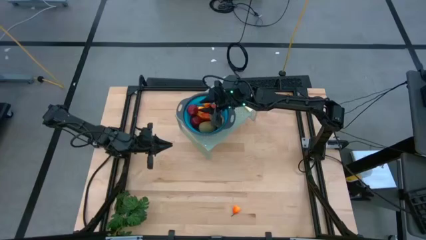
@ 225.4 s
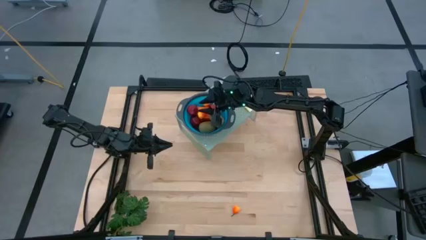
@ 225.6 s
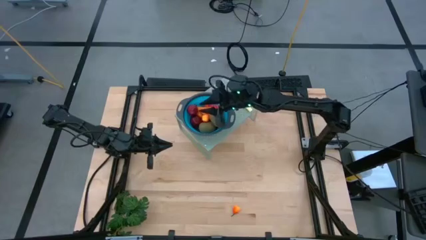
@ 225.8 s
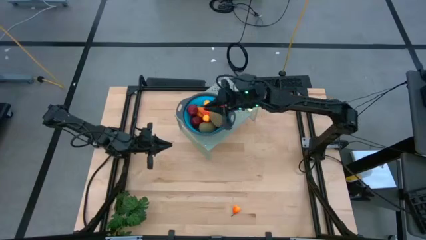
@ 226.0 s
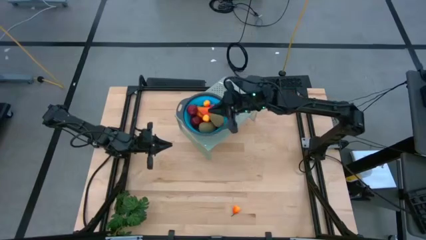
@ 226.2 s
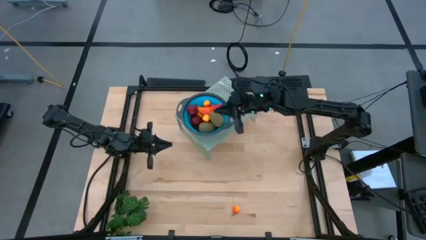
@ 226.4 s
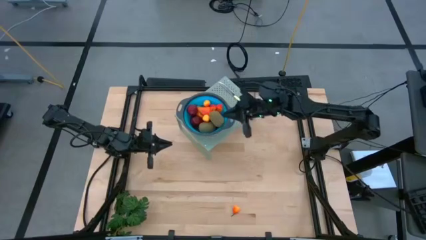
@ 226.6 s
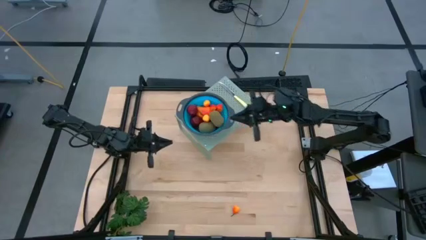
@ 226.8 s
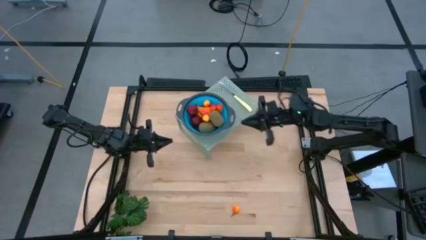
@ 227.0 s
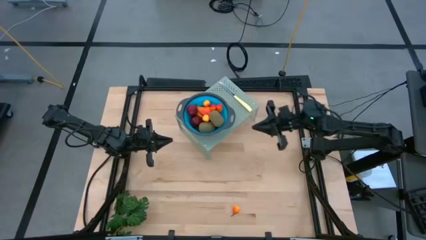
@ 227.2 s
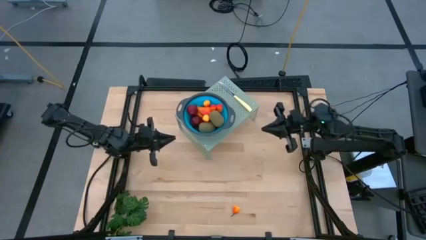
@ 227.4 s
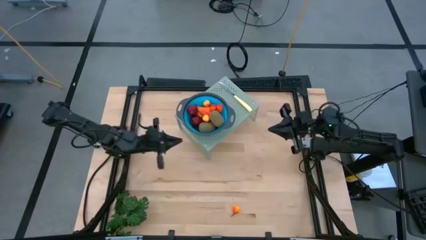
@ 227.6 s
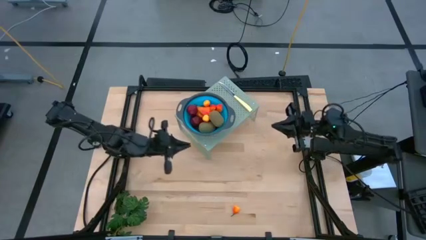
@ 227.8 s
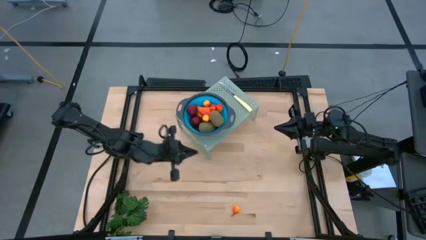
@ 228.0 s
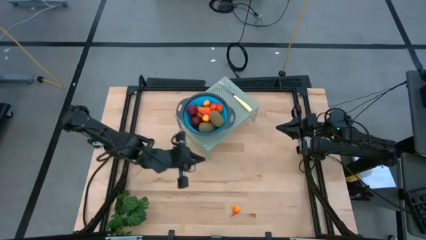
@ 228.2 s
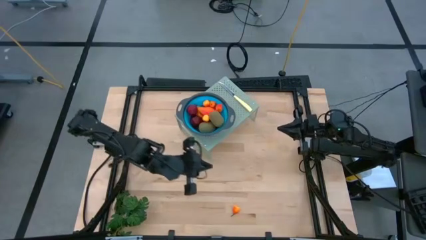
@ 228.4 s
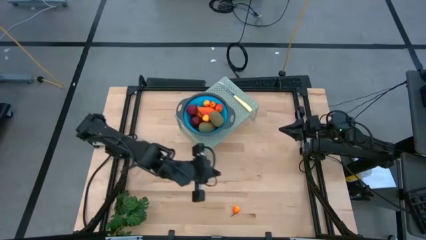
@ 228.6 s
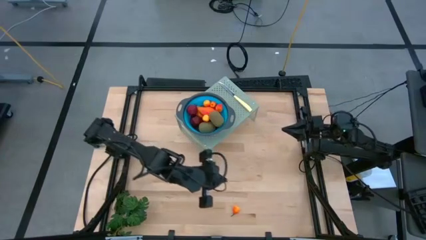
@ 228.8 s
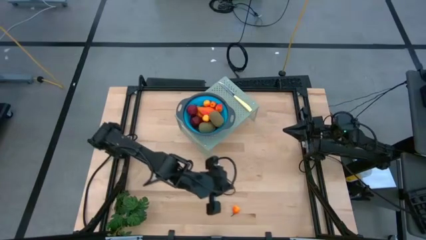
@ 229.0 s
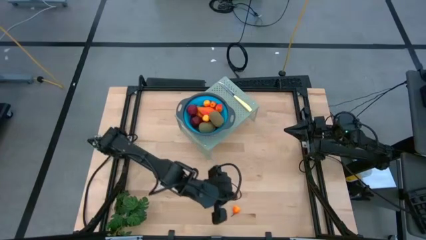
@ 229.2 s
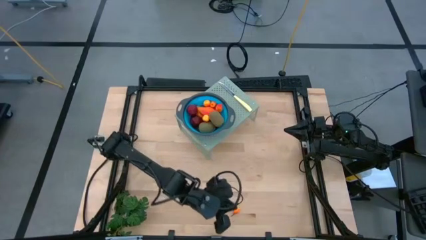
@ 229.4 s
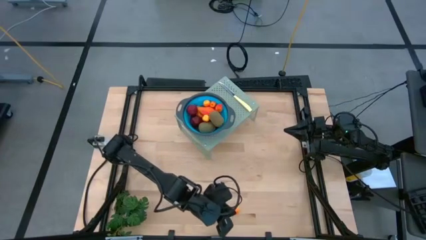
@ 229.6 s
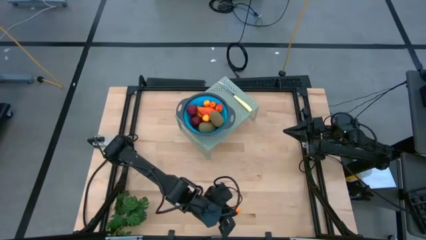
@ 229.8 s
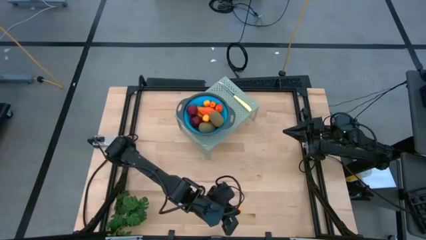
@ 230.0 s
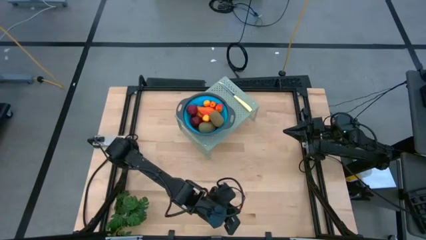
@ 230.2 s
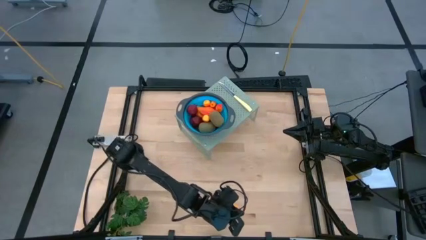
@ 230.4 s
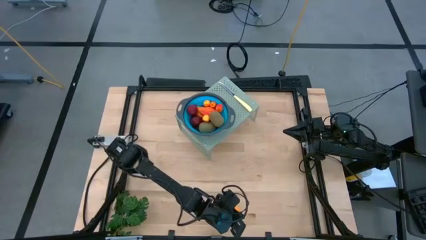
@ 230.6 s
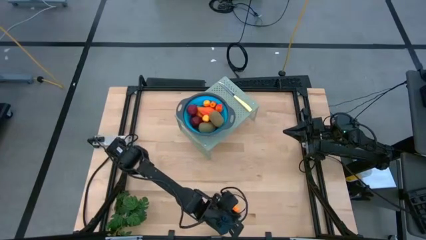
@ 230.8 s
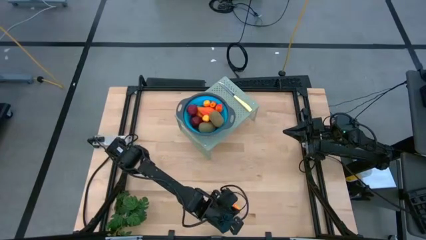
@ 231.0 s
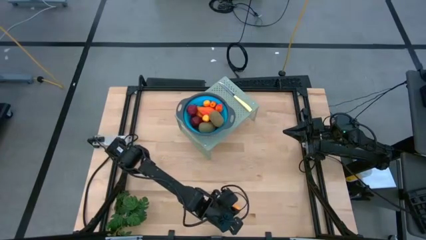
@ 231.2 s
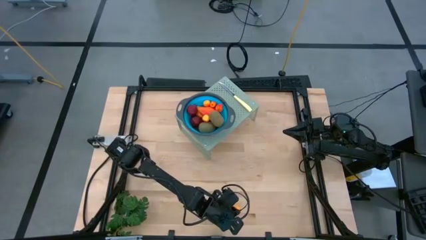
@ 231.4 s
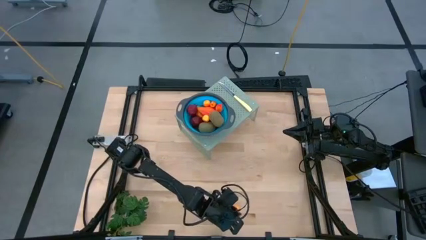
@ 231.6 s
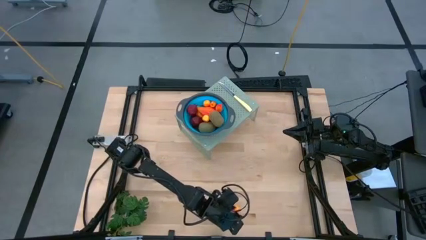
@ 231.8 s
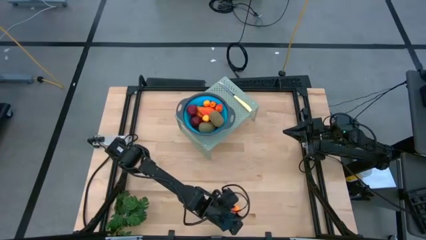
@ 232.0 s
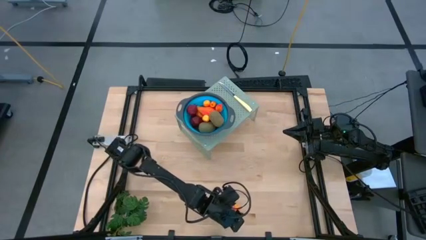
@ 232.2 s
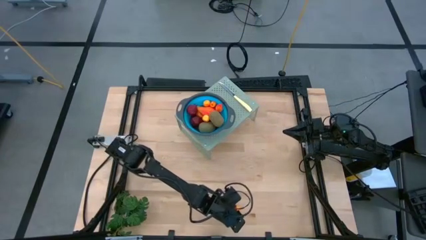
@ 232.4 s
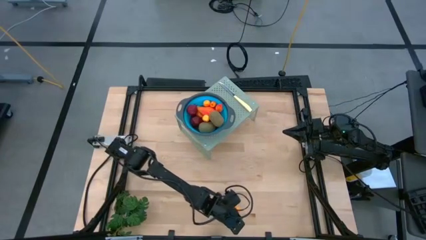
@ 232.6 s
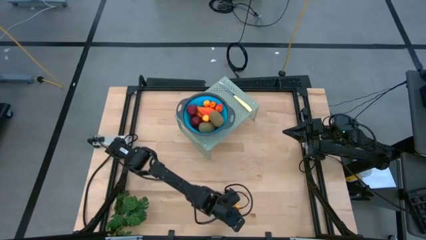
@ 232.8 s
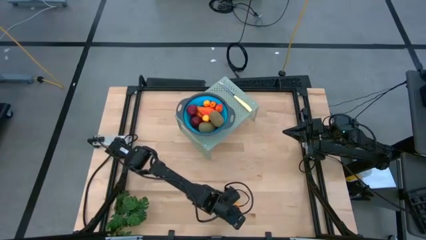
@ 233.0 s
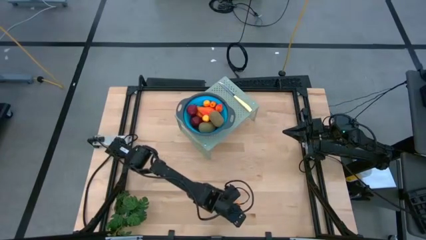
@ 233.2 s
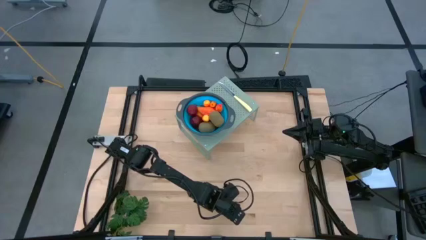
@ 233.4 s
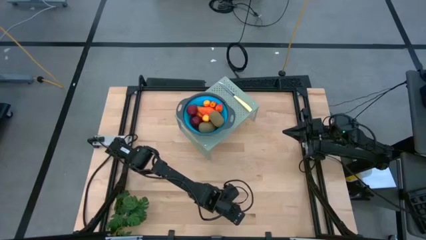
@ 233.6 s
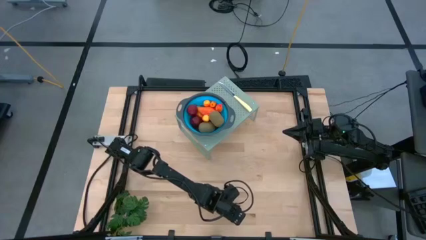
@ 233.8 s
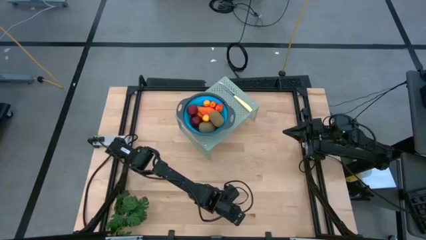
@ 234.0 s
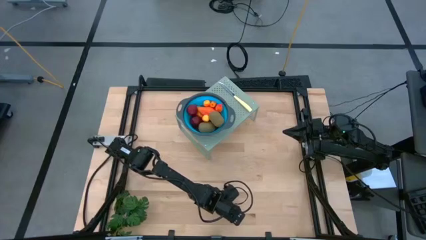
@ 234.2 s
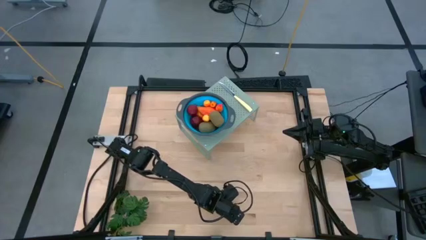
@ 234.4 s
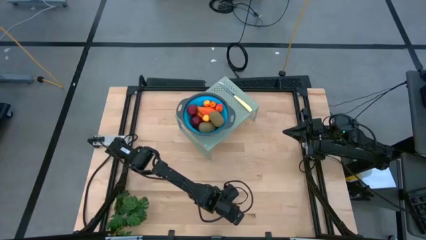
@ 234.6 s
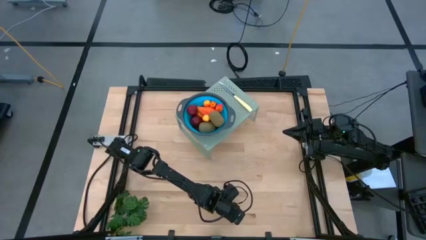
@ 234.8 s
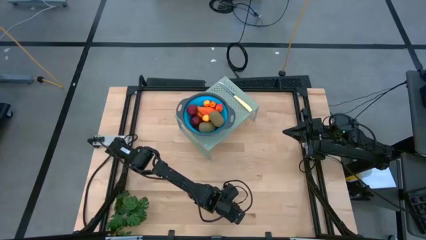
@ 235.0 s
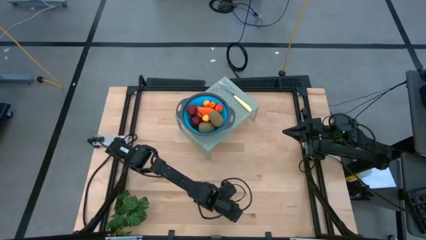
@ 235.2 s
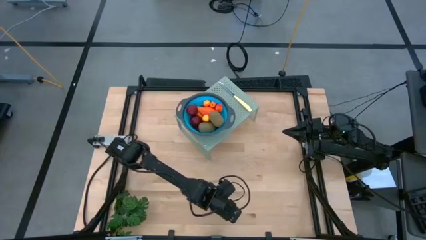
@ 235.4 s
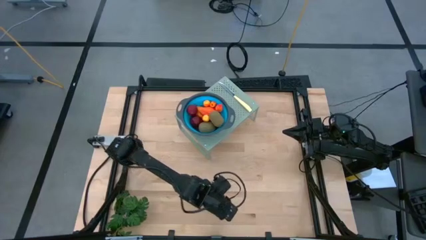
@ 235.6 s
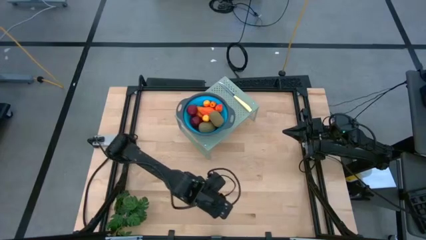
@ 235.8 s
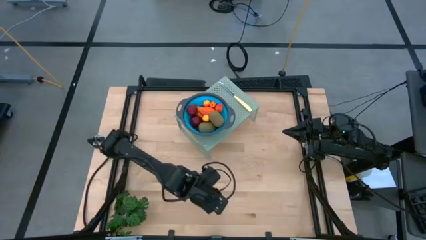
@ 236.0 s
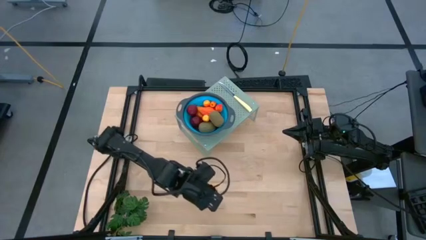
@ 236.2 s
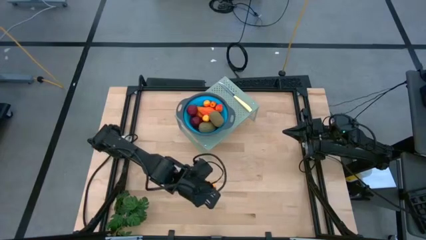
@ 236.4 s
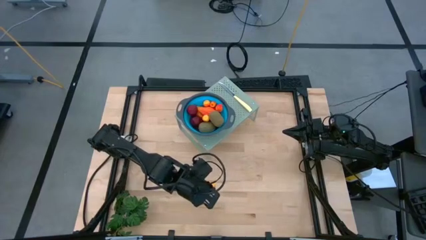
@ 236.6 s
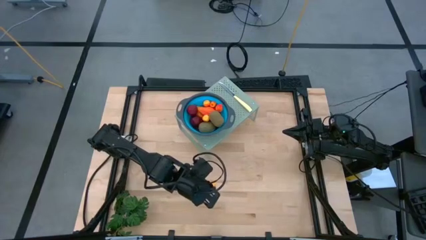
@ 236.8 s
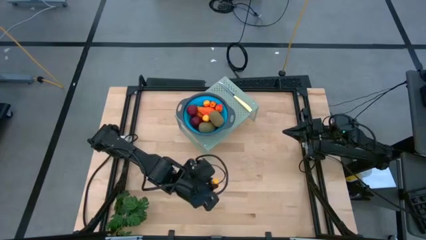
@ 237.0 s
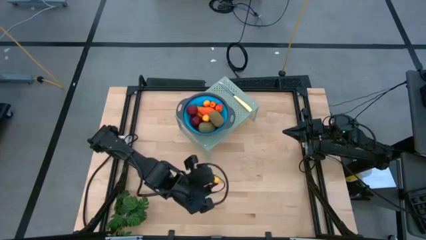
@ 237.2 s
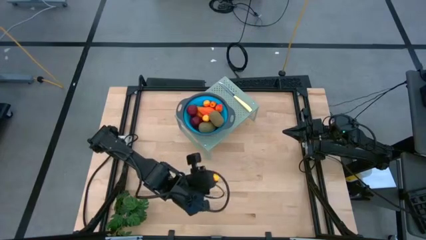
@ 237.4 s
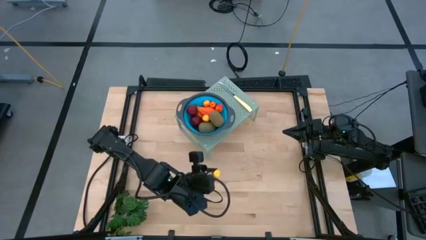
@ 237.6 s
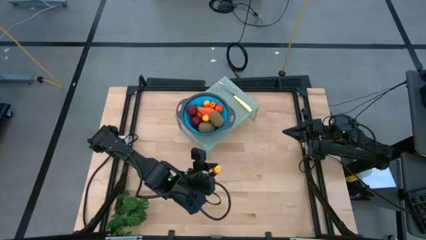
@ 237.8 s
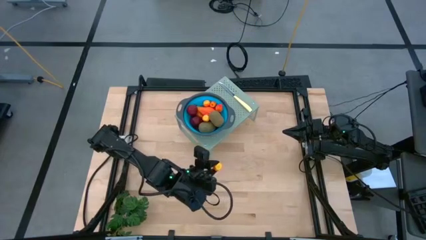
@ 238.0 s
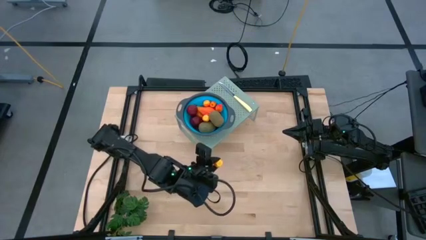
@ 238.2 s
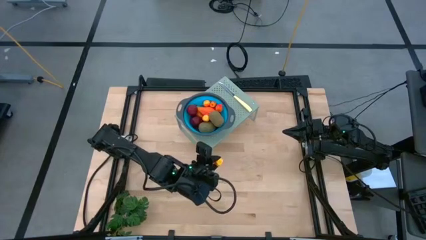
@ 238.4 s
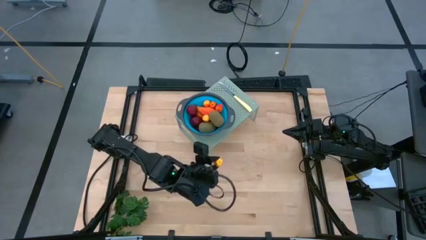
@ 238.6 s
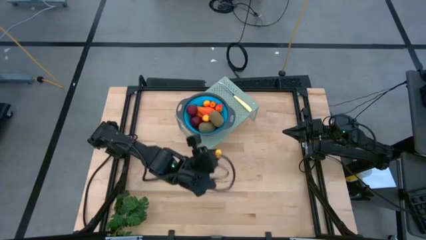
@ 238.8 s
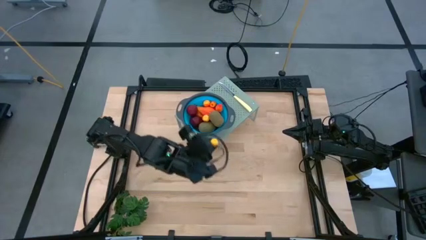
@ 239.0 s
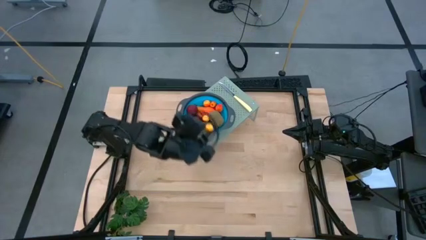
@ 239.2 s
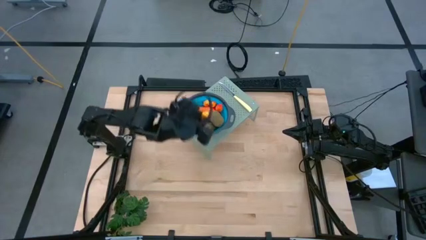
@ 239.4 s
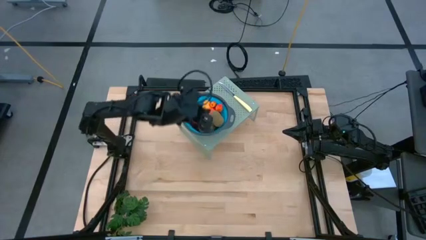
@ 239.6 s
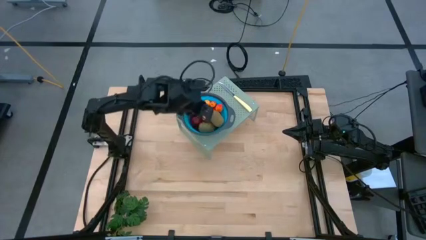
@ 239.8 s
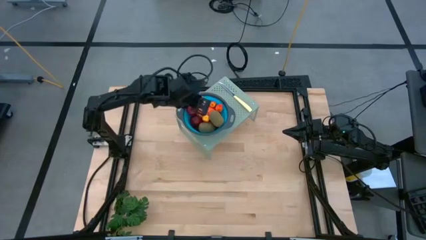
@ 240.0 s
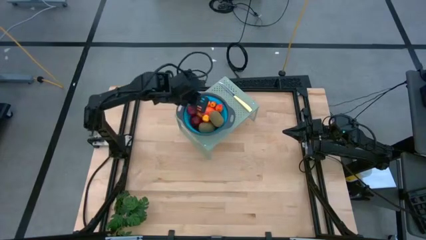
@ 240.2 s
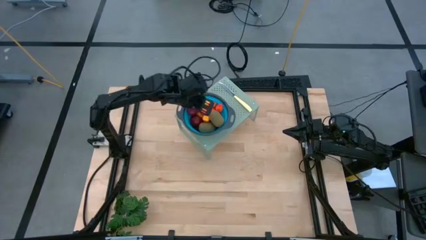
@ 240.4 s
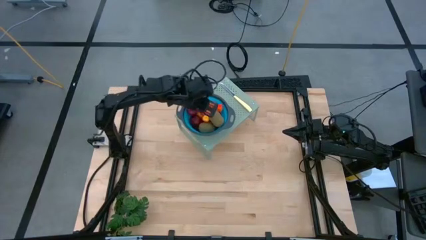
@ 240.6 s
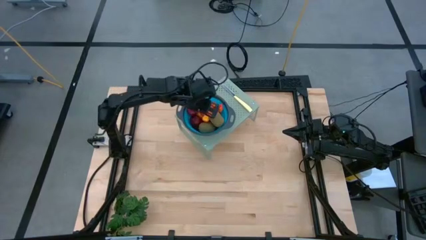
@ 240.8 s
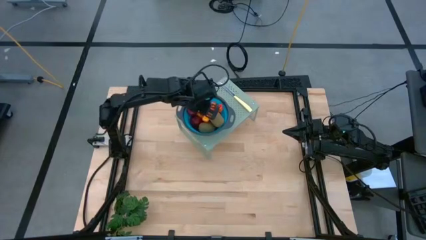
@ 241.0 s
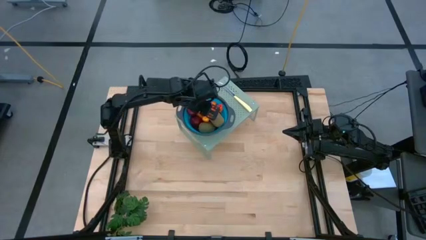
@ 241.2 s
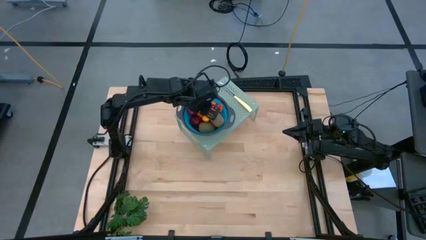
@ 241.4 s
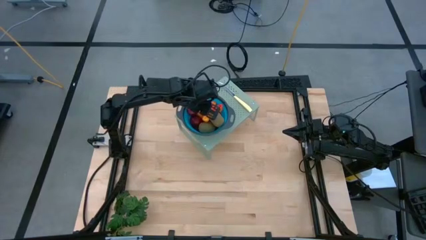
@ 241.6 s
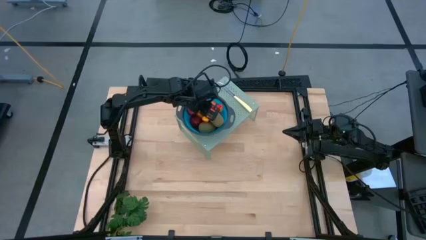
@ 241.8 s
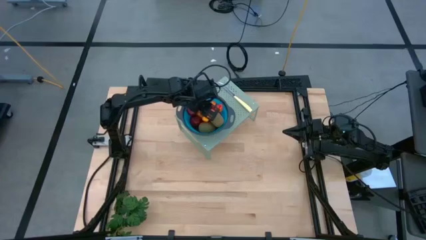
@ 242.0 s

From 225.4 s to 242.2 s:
Task: Pick & Place Fruit
Put the peach into the collapsible colander on the shelf
